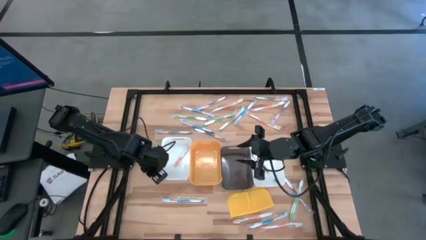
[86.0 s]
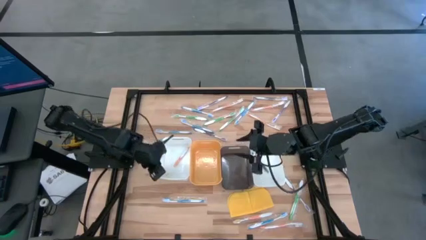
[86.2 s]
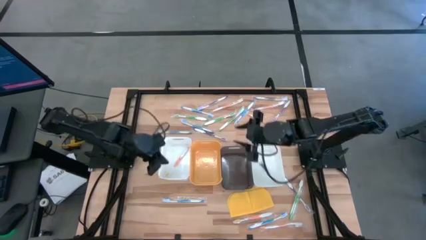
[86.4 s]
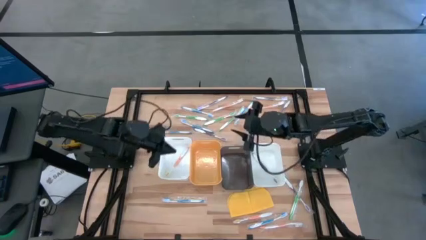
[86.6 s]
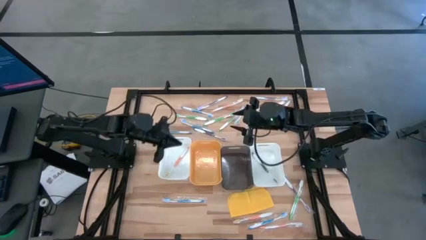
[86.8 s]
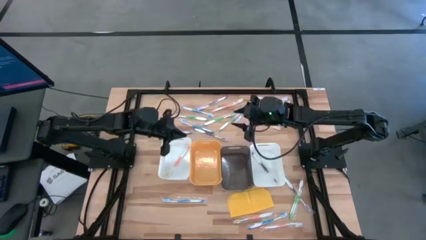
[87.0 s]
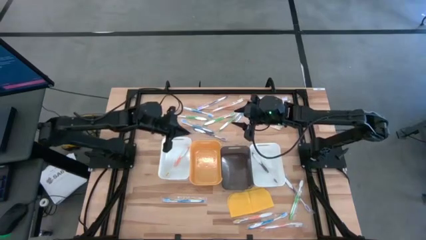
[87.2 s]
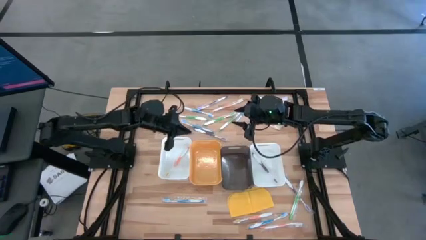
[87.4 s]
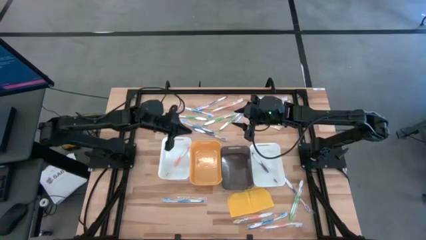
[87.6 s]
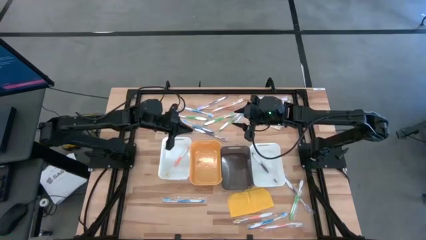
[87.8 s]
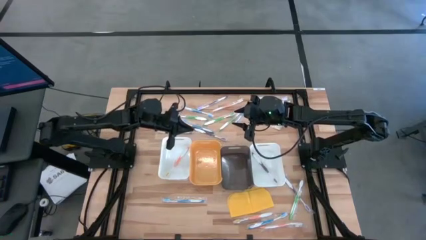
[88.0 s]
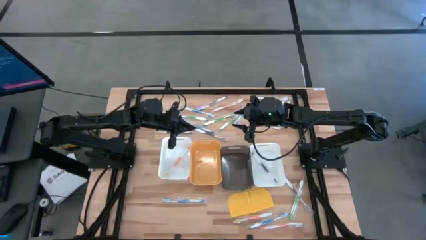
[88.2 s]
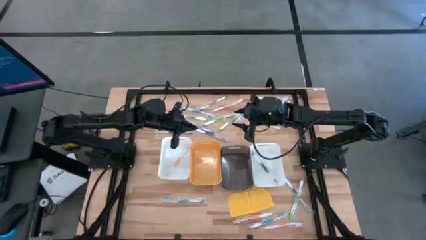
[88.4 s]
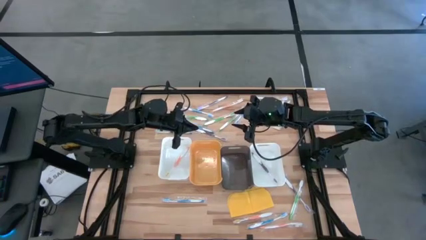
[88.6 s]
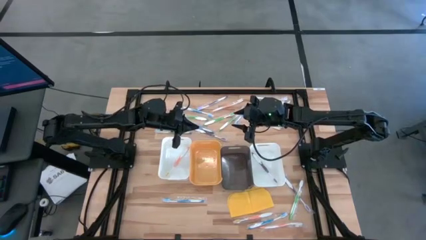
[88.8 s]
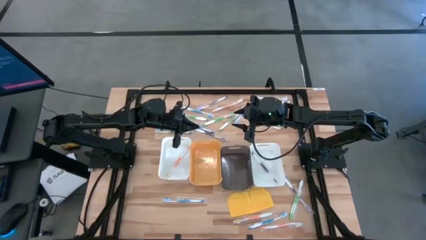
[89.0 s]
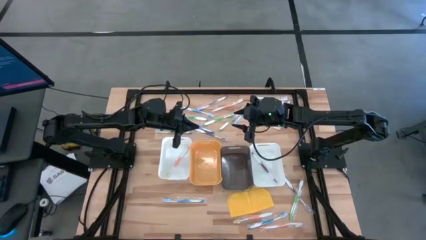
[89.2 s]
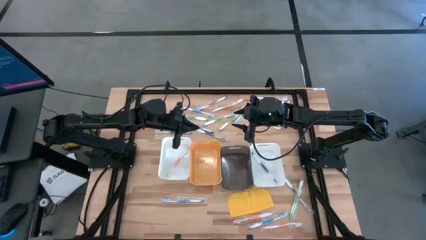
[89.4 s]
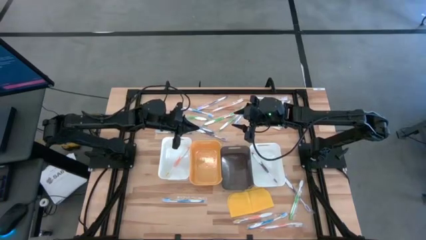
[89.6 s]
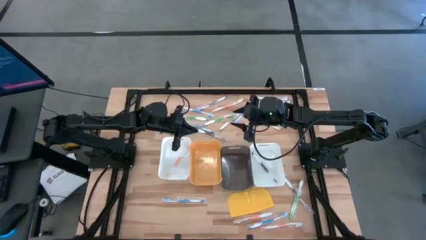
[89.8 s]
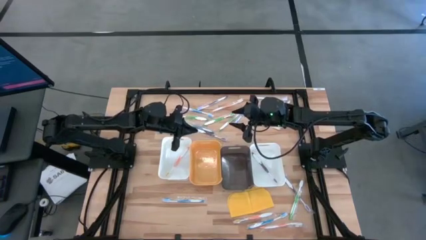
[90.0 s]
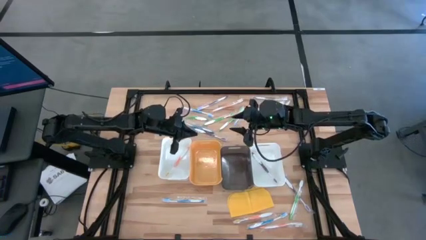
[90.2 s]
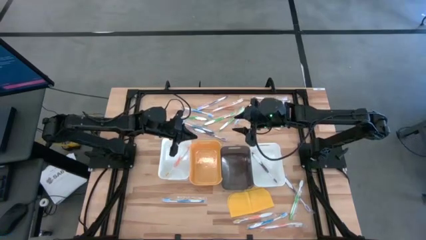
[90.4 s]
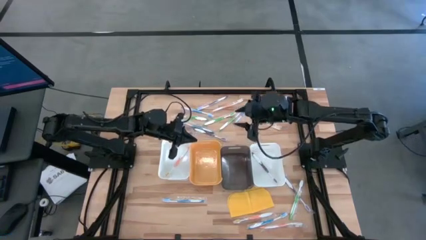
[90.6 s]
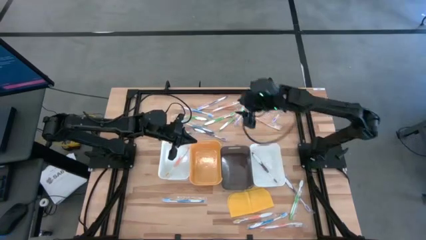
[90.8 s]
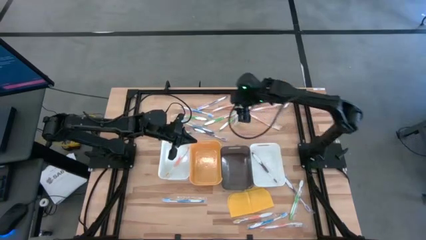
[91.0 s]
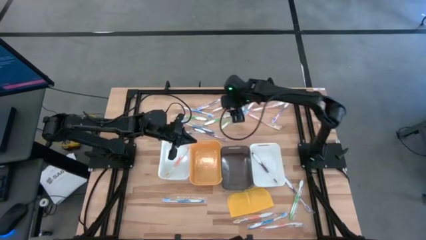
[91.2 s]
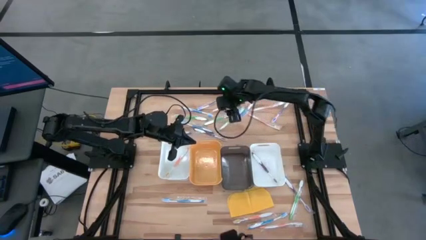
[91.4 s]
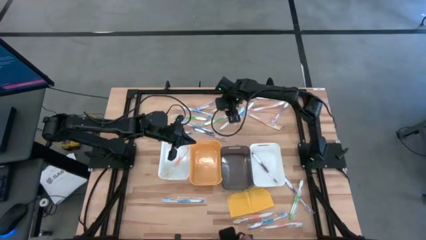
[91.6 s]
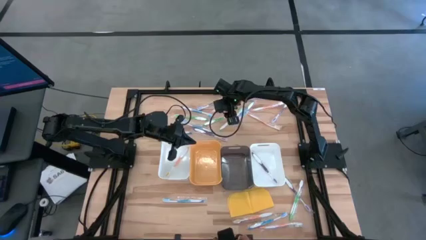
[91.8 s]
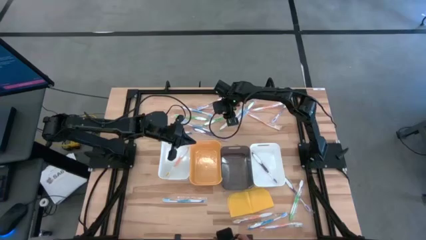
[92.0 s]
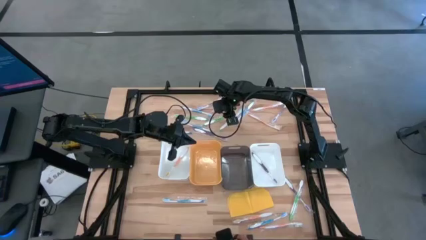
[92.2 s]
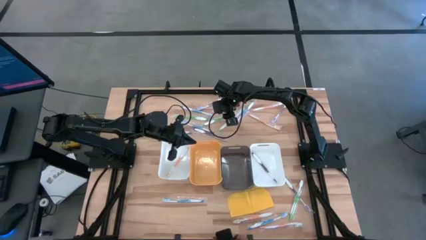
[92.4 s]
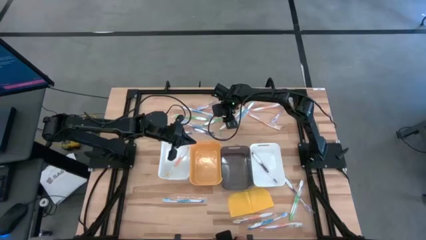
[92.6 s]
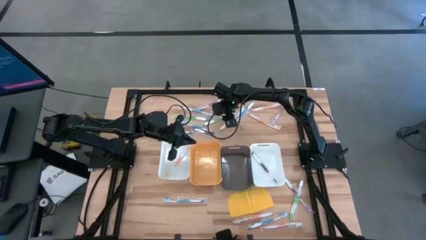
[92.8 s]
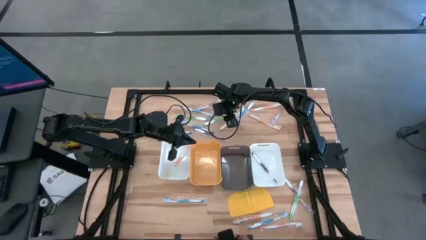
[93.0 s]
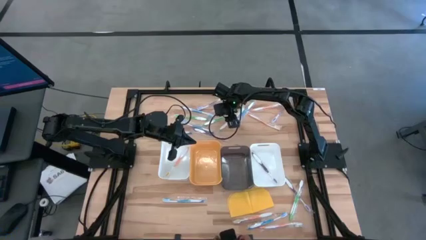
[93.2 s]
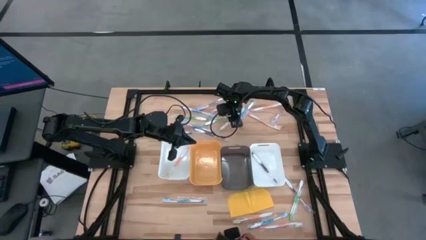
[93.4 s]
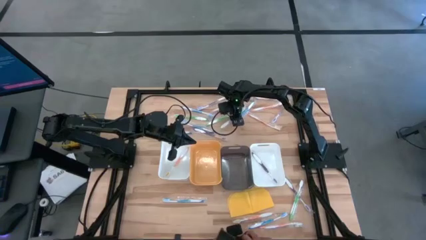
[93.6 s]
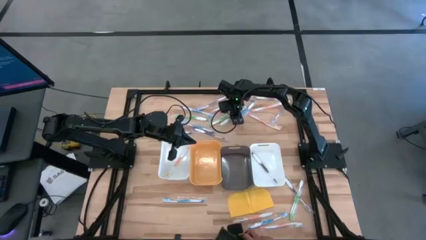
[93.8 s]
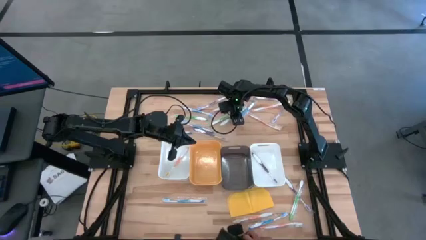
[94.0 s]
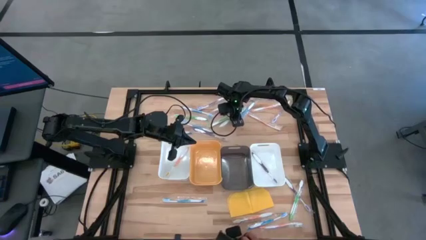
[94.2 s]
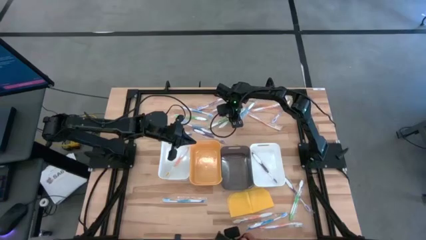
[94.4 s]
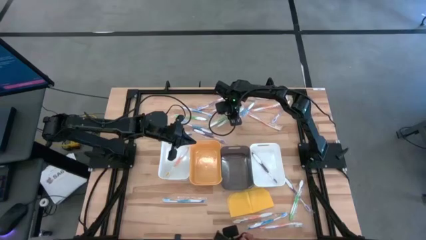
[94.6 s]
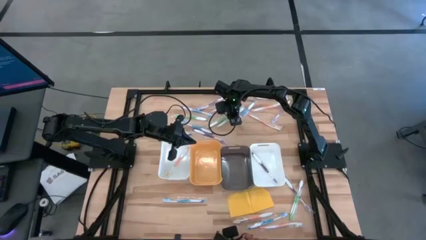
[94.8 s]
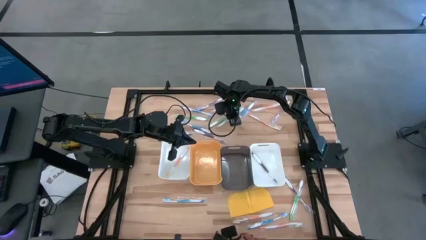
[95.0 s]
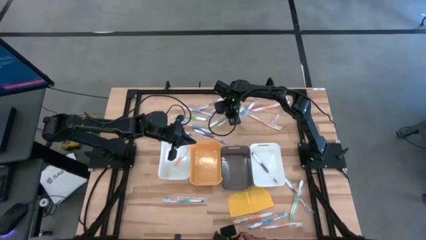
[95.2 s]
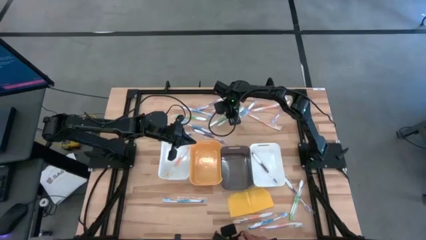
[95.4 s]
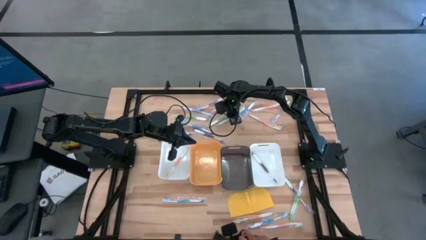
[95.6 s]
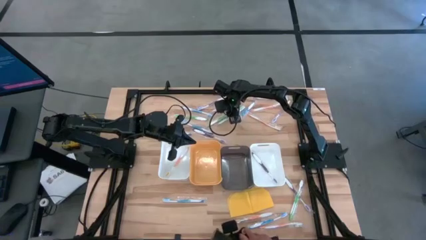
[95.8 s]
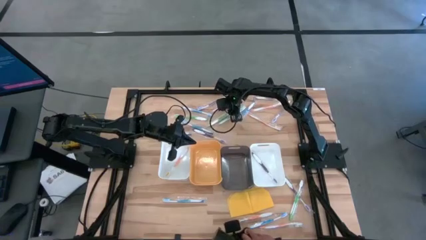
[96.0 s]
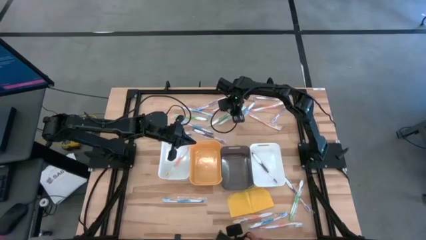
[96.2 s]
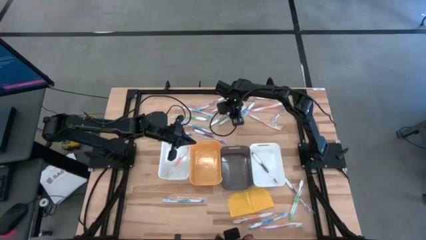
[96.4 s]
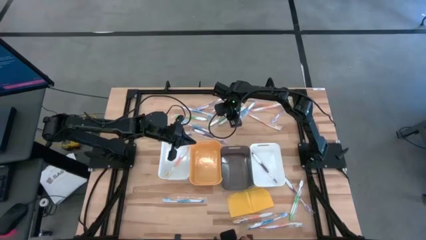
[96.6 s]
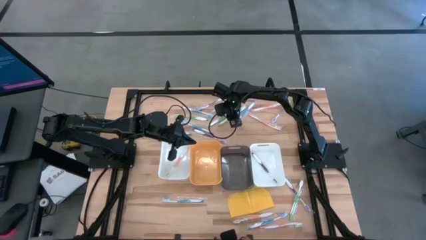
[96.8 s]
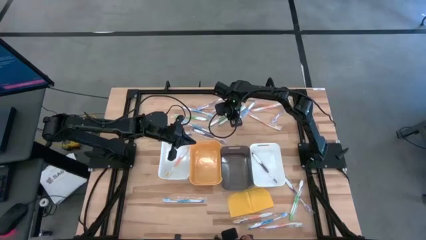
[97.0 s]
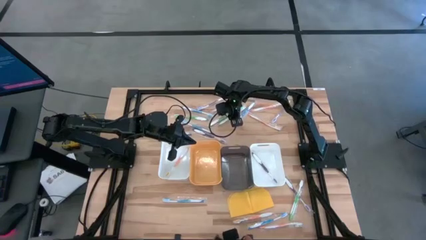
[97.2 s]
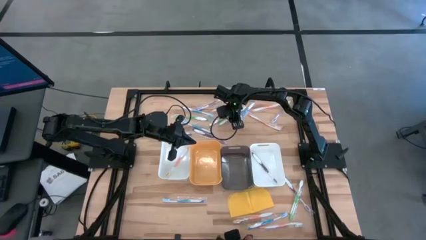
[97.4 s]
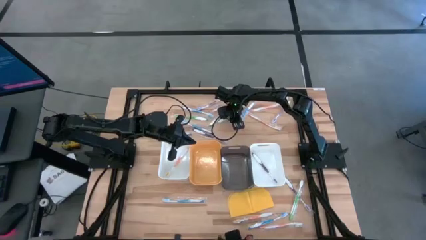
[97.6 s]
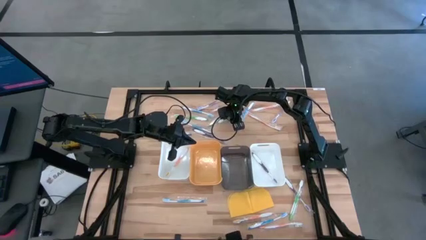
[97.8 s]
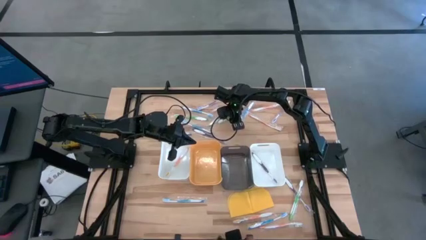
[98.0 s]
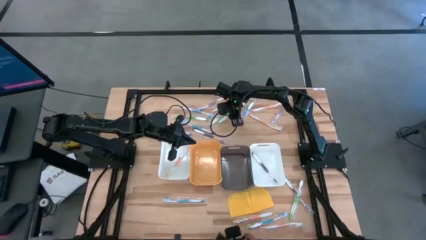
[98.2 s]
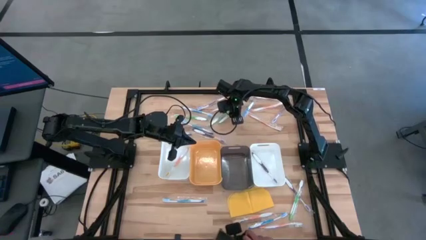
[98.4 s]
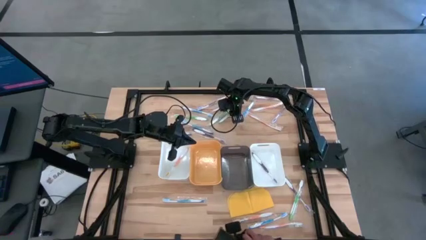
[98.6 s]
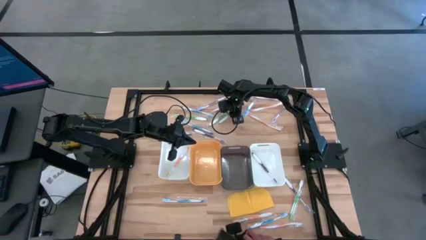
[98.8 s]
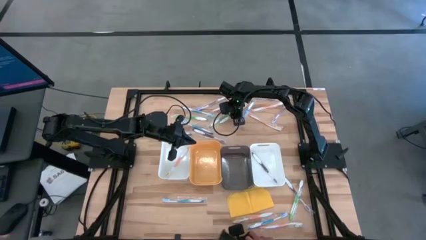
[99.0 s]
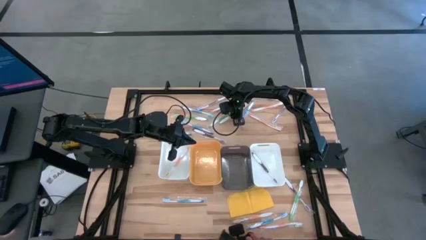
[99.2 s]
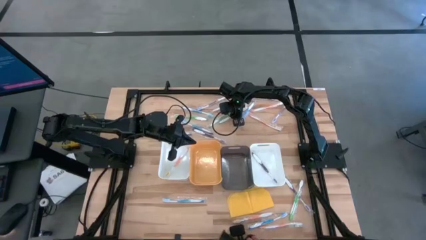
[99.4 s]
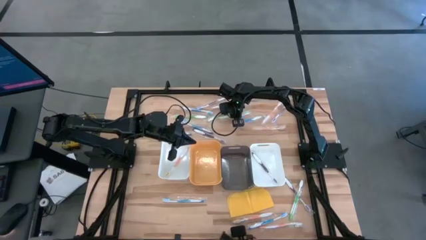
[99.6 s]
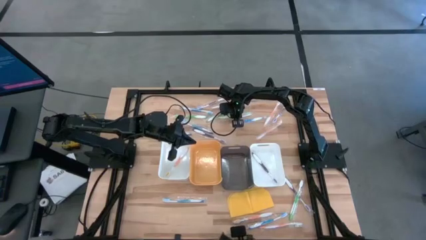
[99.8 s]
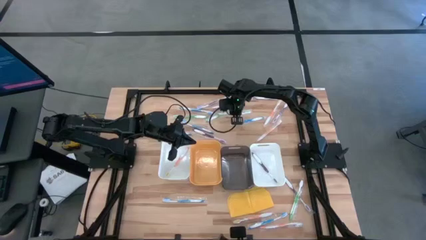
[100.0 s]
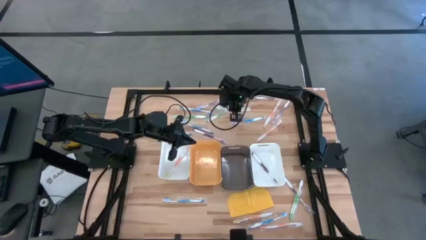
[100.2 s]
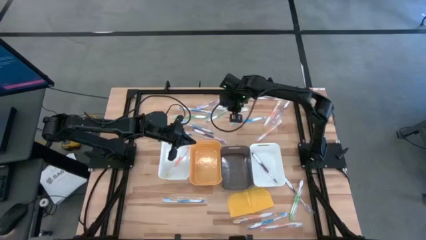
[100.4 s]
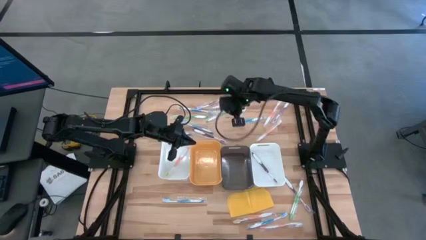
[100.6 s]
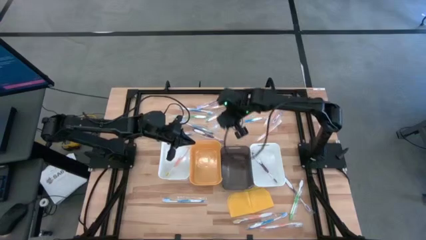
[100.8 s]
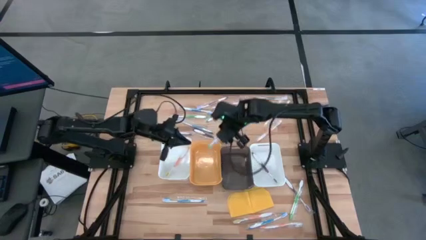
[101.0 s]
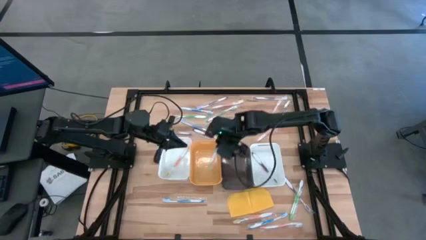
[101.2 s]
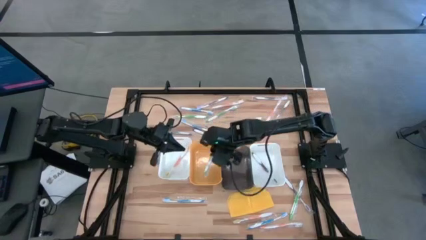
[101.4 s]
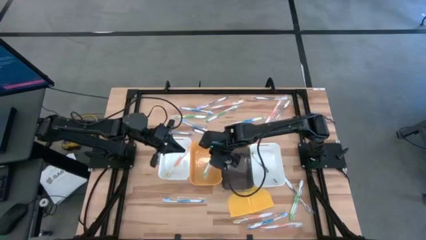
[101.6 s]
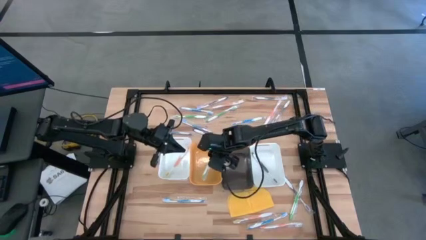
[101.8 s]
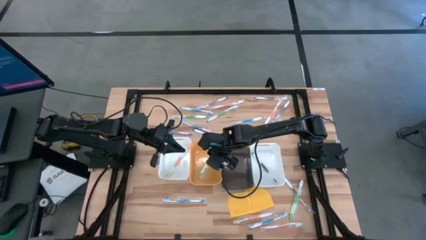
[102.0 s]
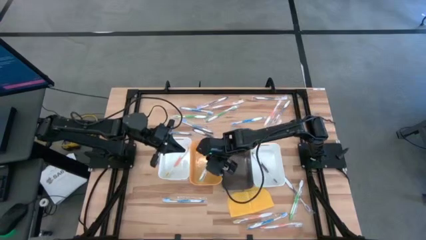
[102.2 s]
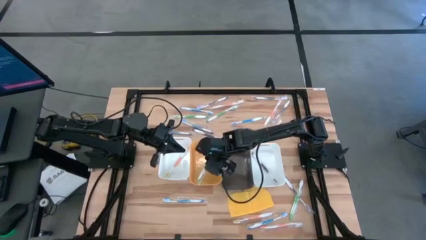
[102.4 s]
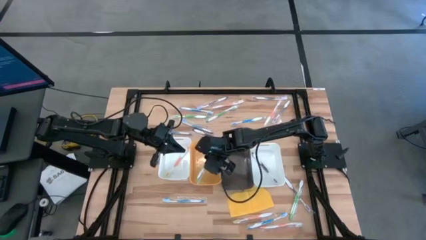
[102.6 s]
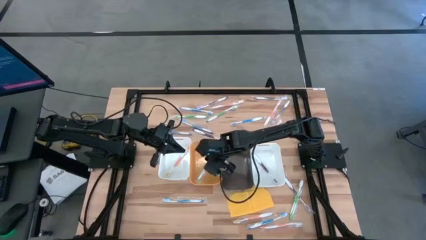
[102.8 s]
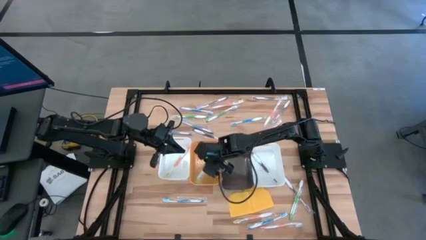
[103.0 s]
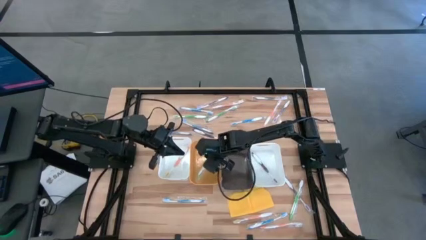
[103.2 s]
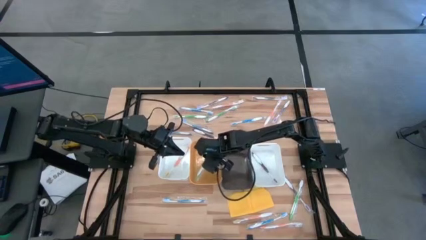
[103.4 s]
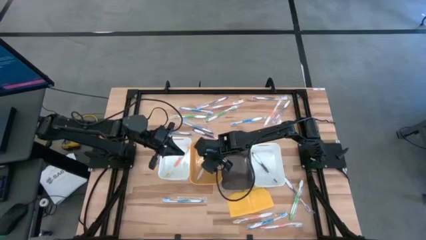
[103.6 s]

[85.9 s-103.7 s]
Task: Pick & Place Toothbrushes
Put the green toothbrush into the yellow bin
